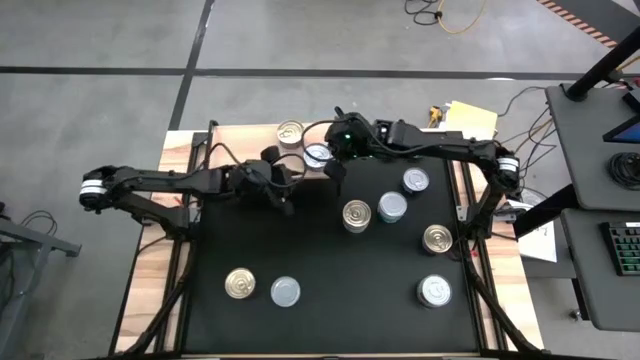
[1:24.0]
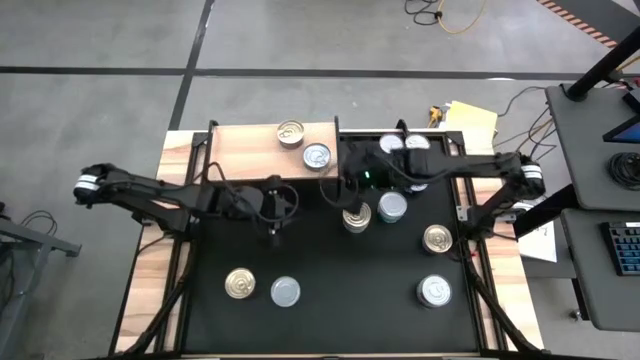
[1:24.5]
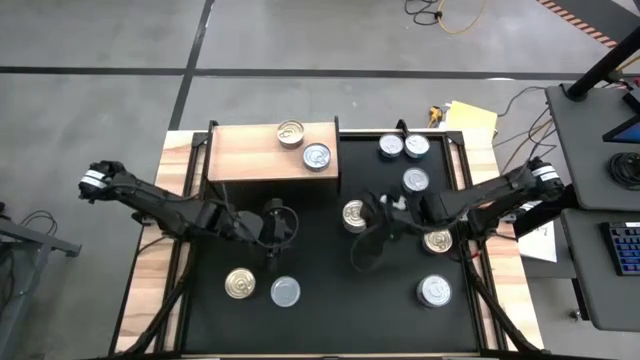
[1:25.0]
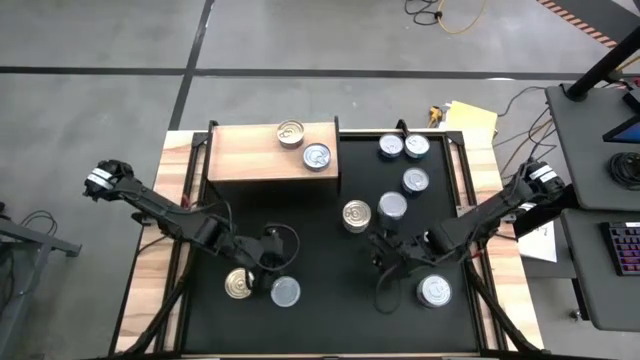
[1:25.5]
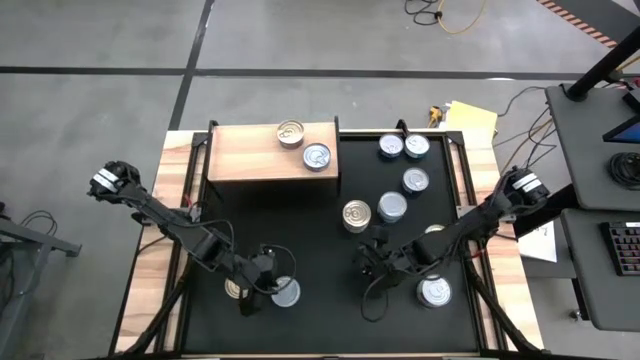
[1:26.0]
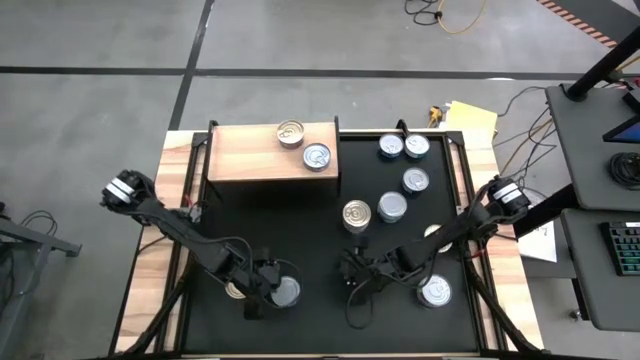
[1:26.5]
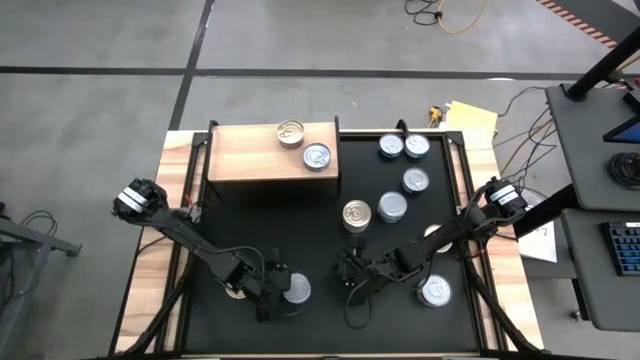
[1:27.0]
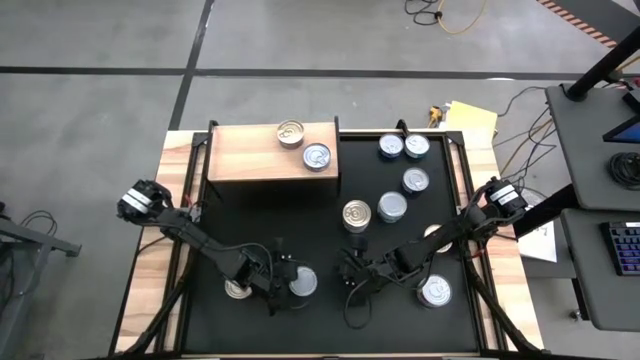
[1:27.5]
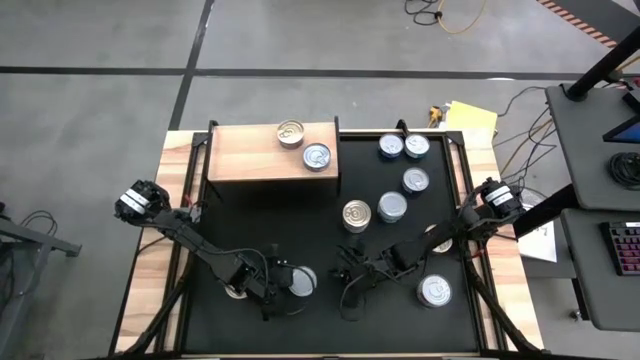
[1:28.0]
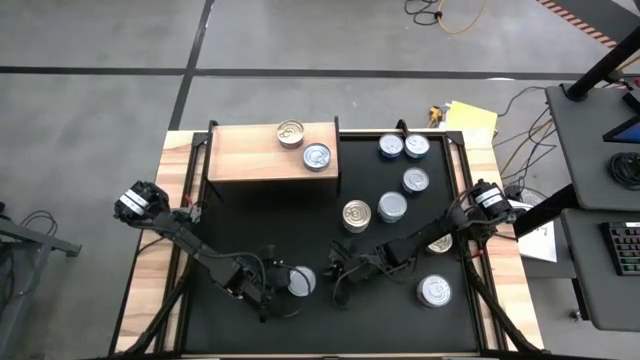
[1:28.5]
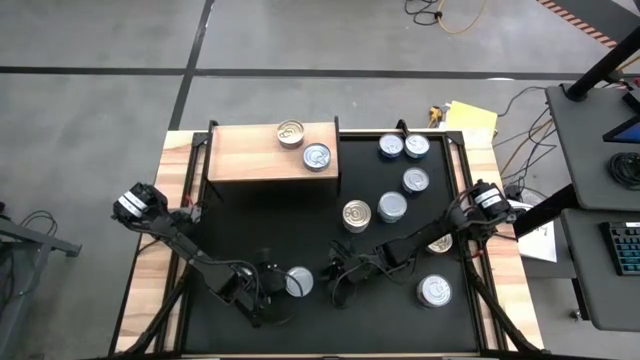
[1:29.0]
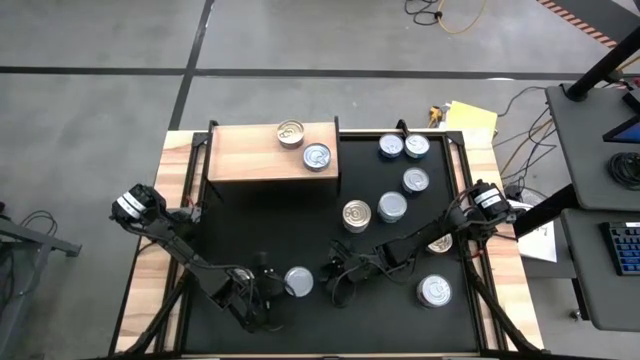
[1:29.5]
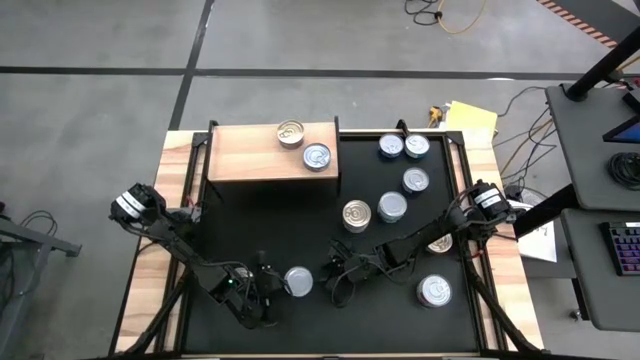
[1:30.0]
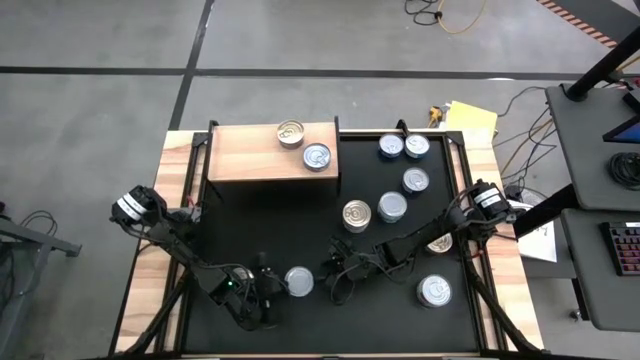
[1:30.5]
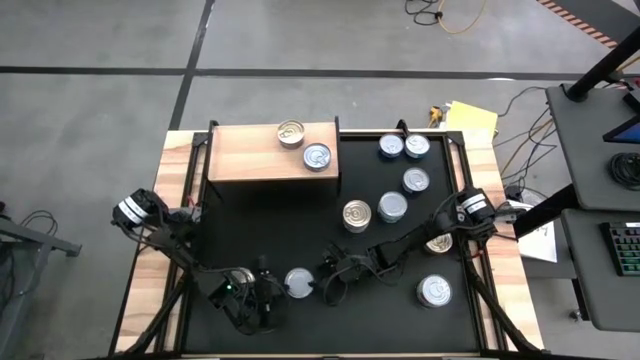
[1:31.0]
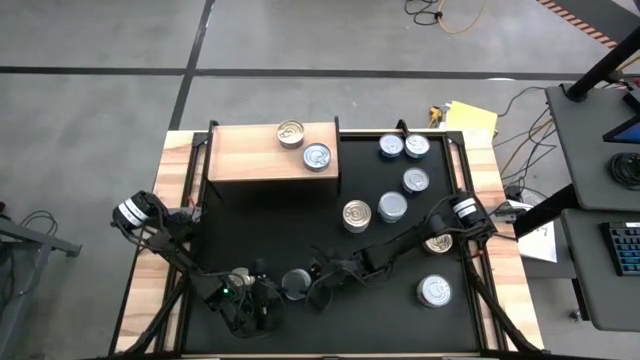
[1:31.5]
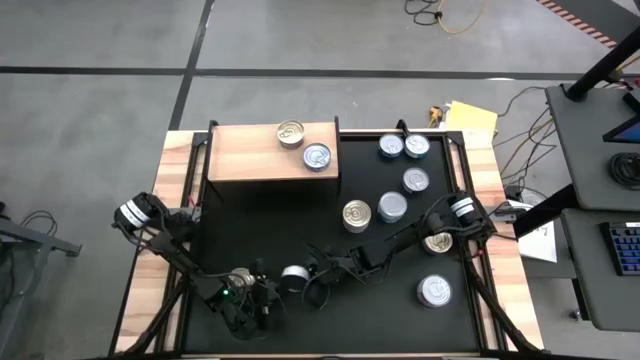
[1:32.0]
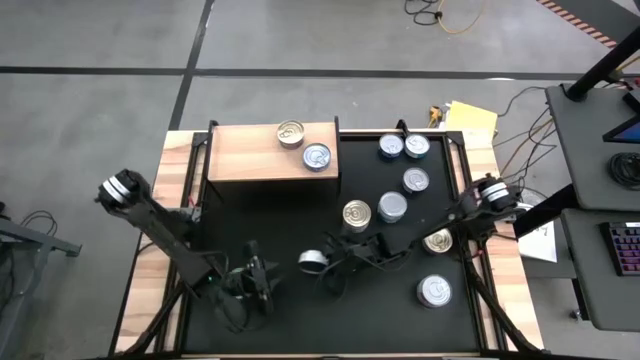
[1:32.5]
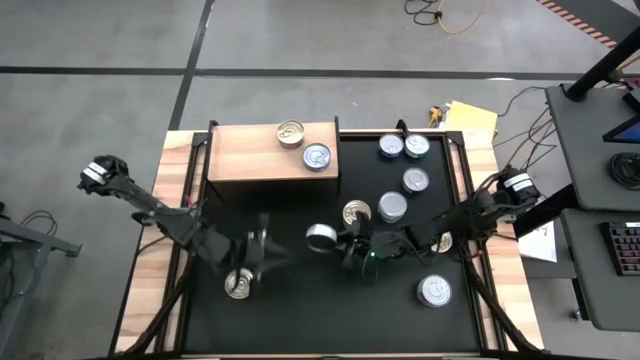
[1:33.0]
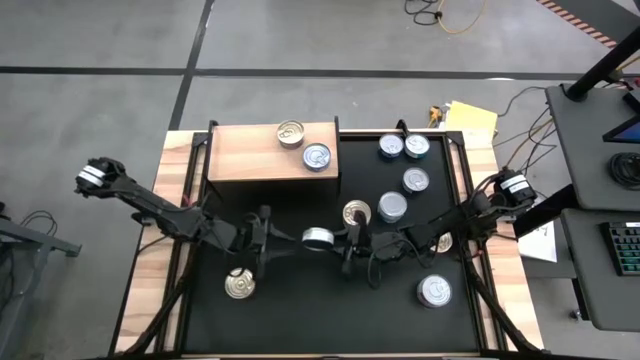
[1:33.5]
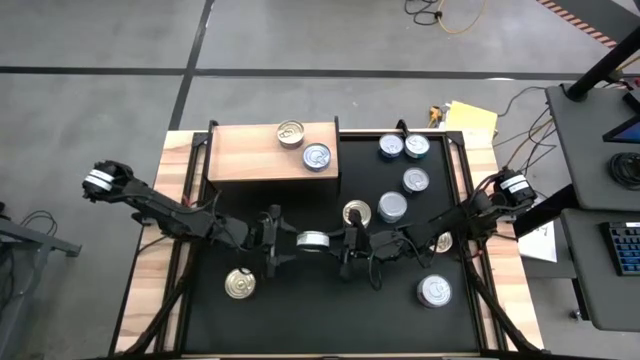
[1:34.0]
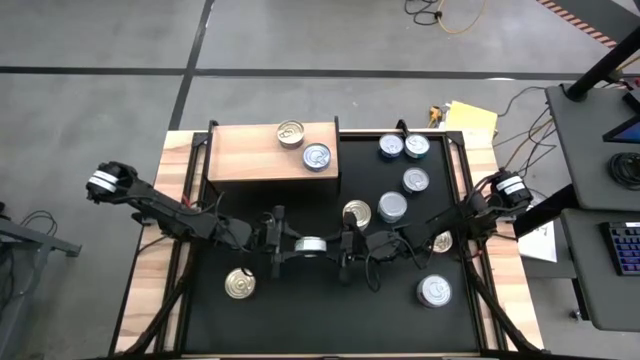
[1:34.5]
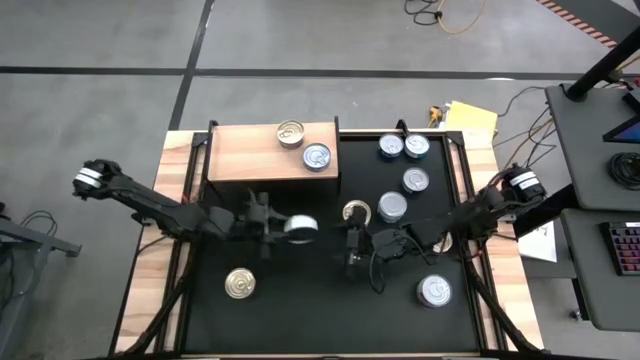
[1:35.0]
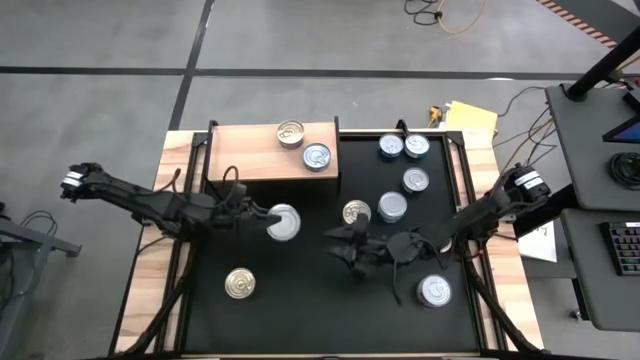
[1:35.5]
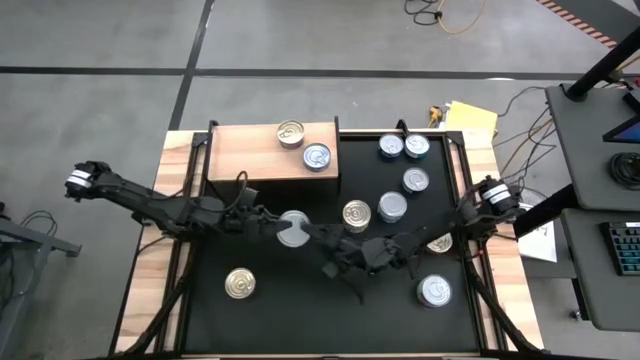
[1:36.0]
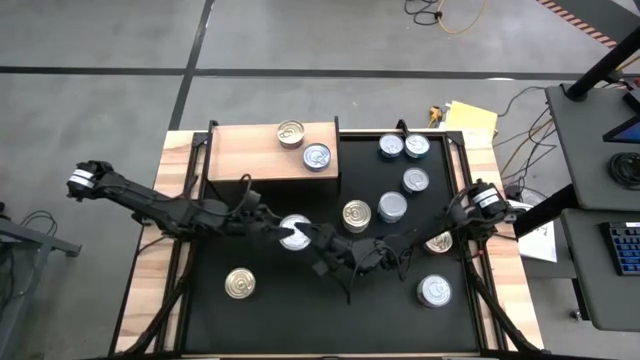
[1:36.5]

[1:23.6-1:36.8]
Task: Stack canned seafood by type on shelf
Put the green/white tuna can on the shelf

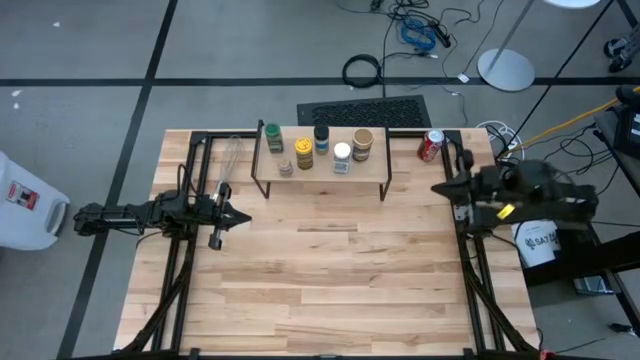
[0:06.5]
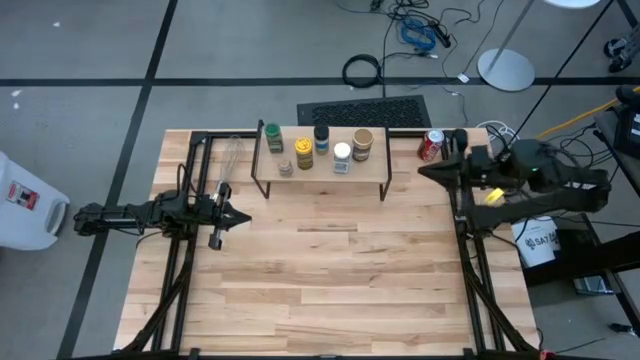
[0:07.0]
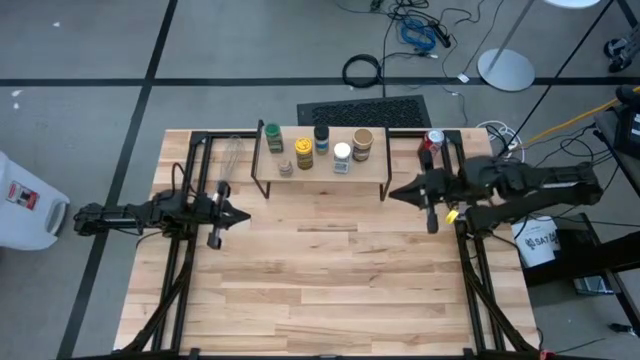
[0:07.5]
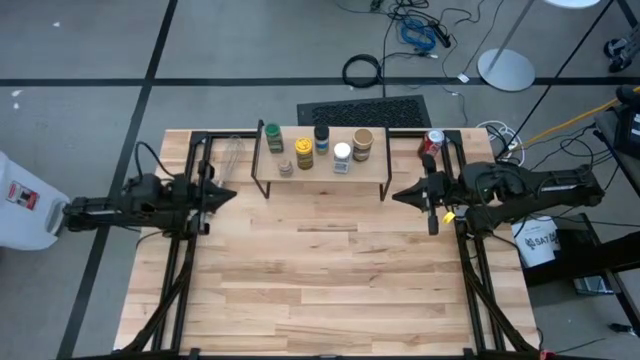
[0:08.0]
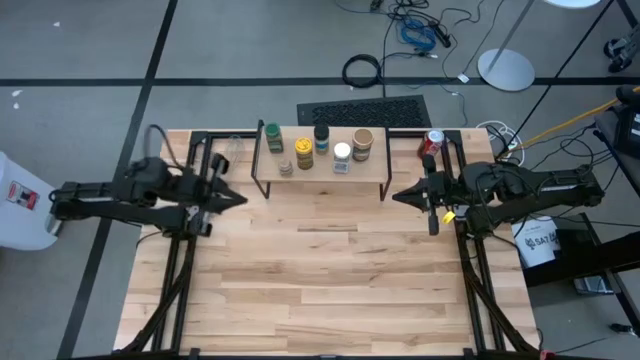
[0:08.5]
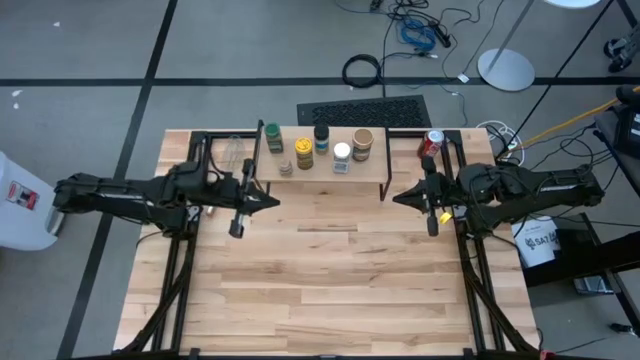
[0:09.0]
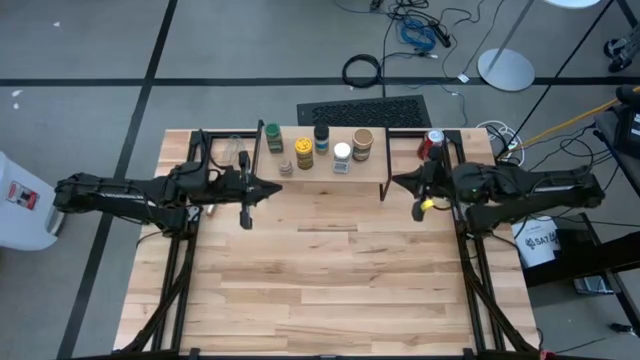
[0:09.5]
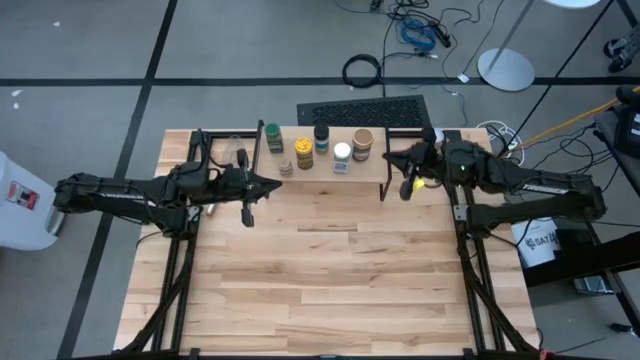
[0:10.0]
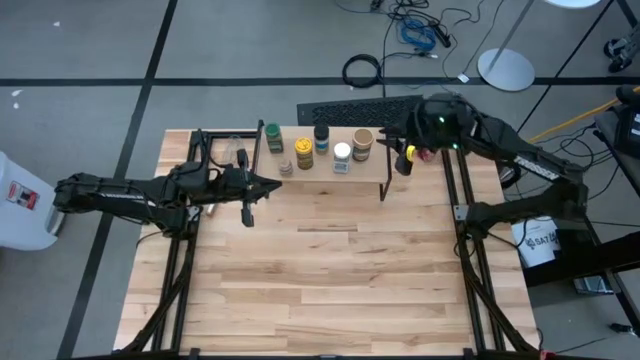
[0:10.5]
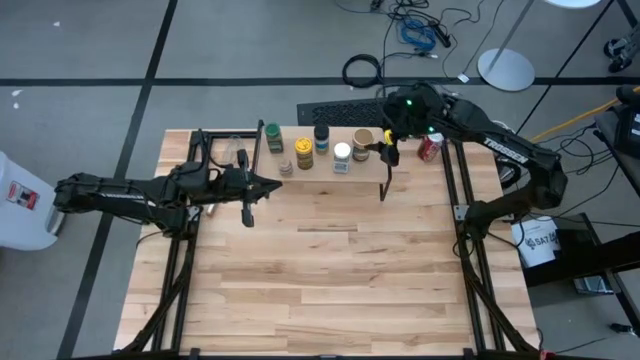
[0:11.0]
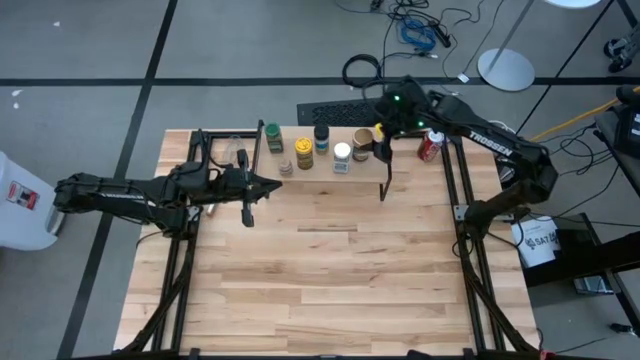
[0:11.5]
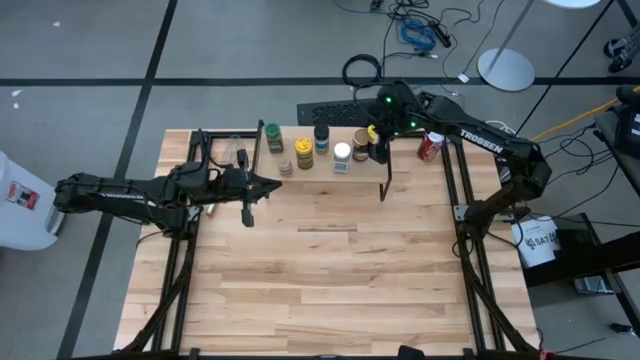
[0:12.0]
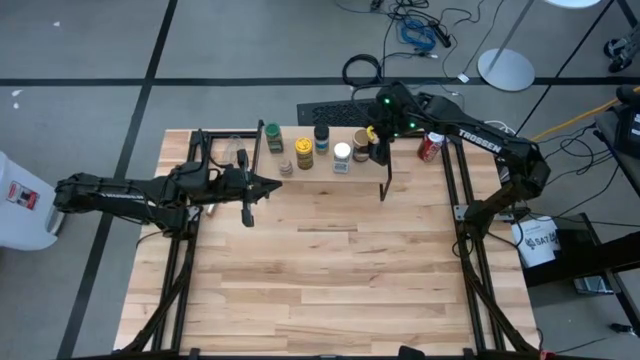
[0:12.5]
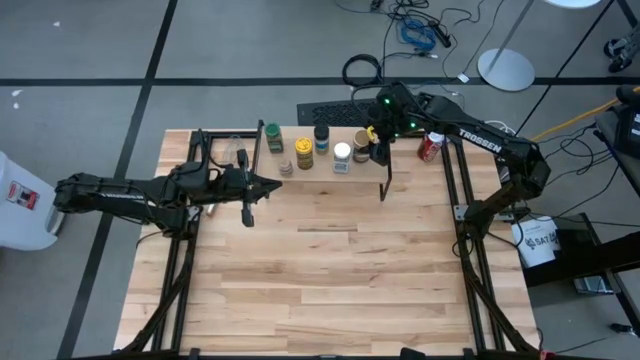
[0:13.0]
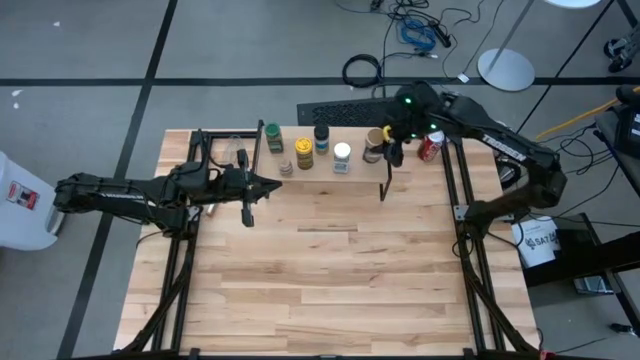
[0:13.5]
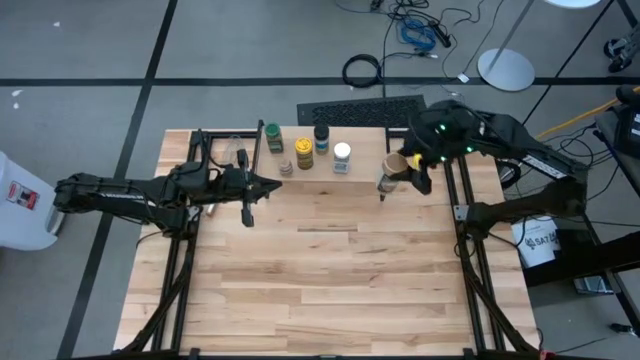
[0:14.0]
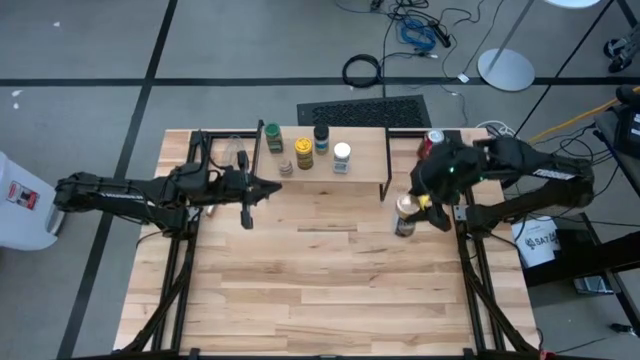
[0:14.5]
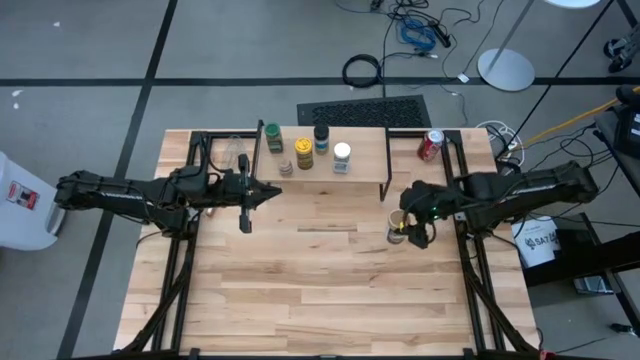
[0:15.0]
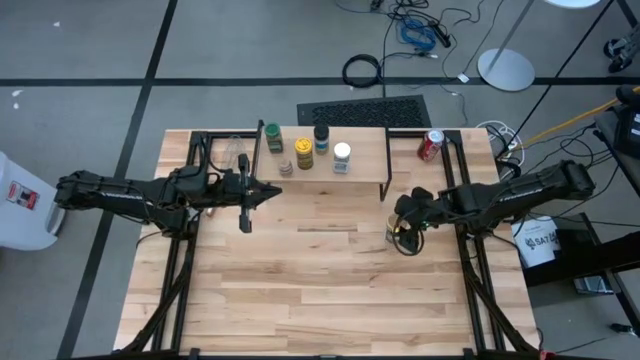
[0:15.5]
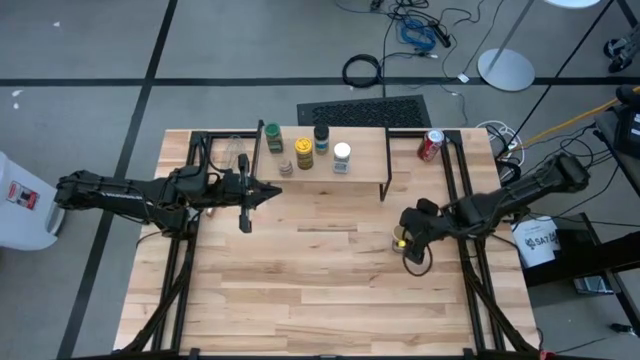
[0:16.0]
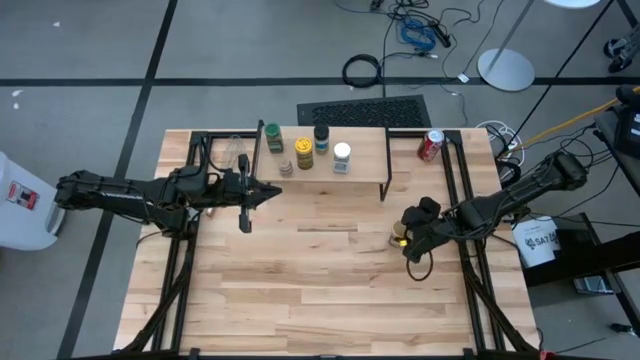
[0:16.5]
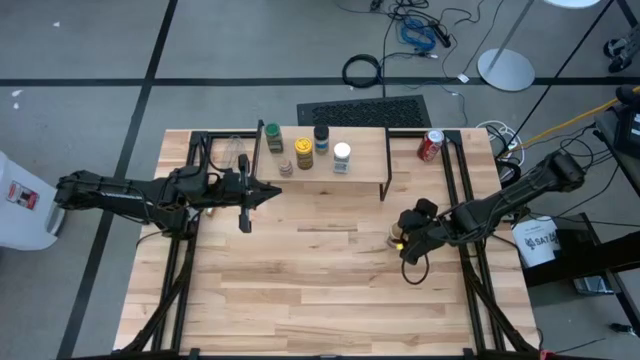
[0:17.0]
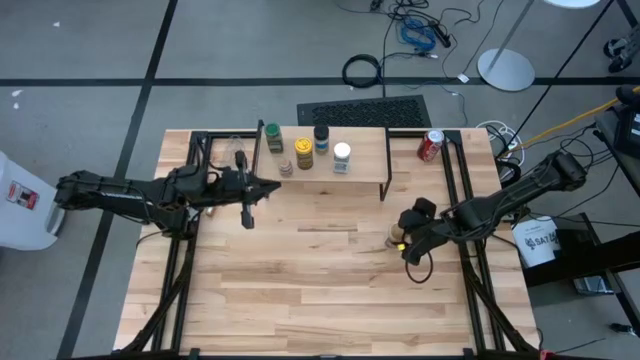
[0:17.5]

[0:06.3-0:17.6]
Task: Shelf spices
Remove the golden seasoning bottle from the shelf
